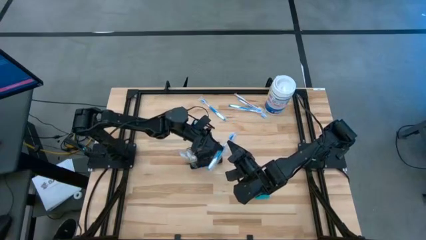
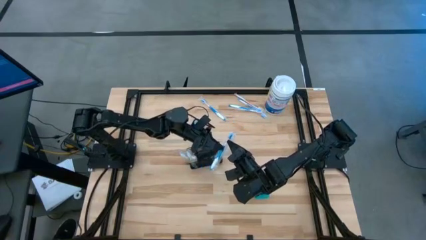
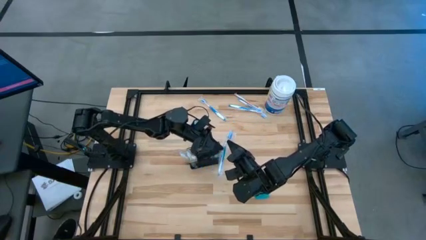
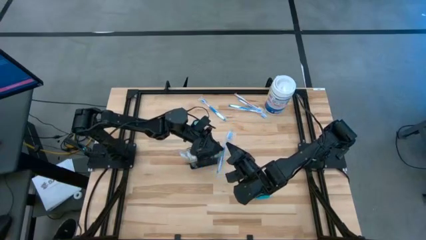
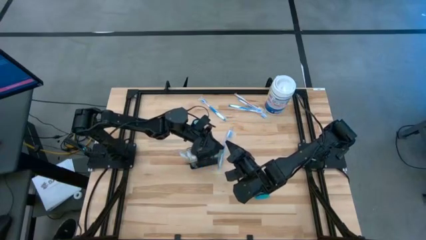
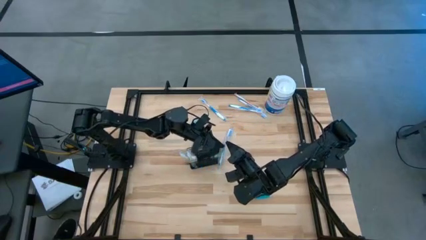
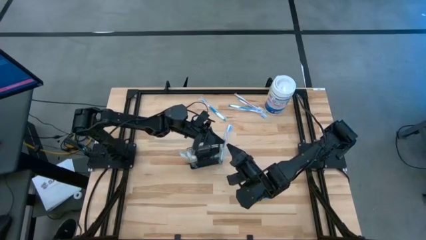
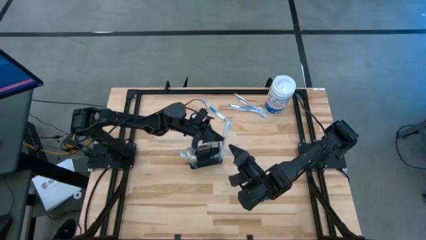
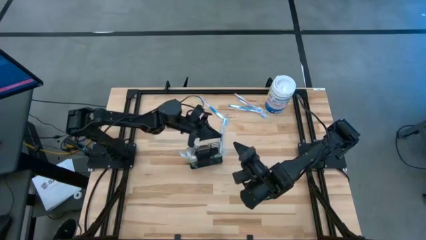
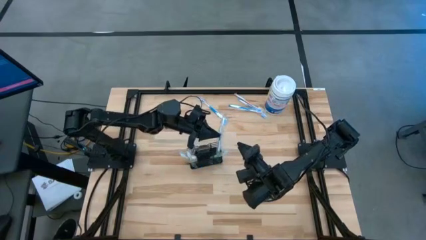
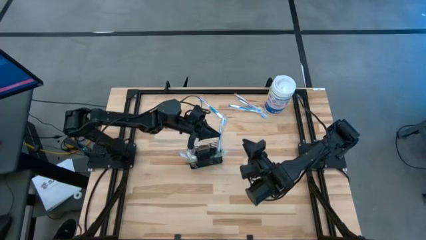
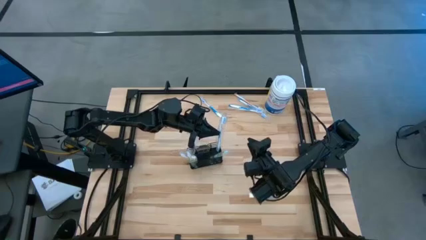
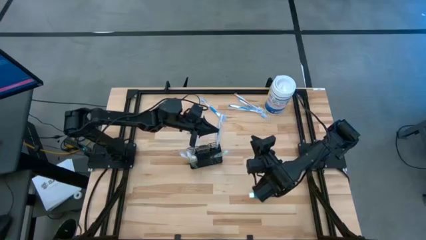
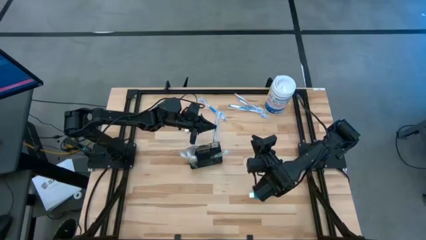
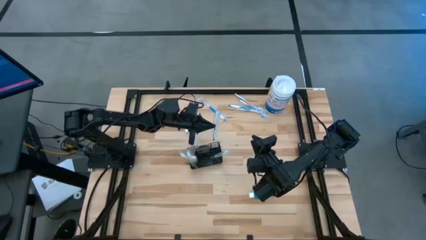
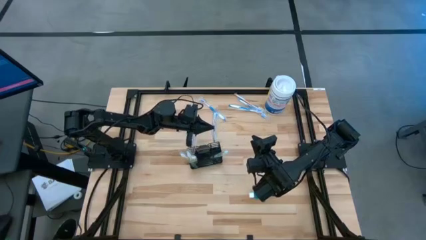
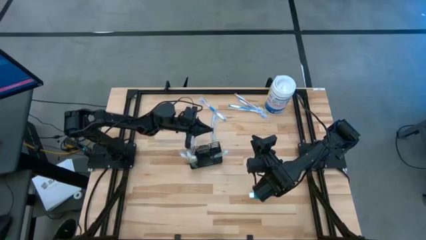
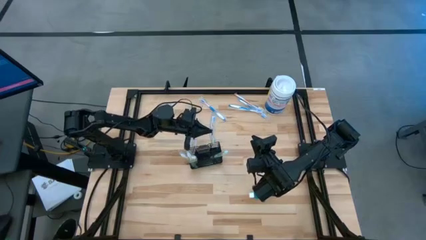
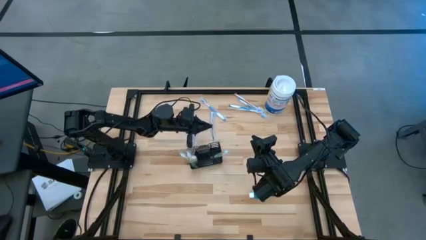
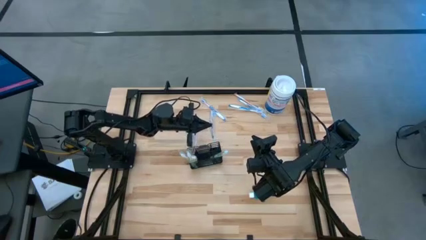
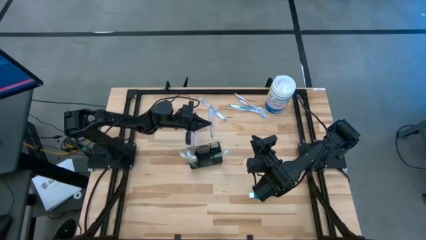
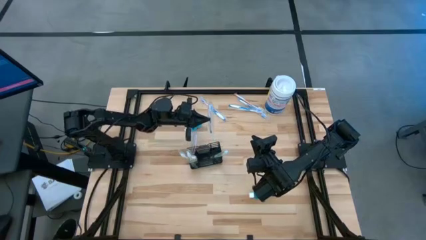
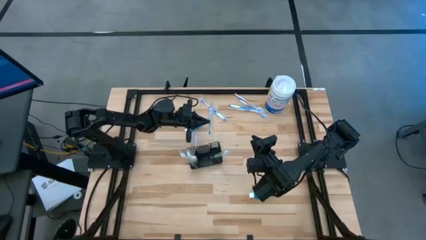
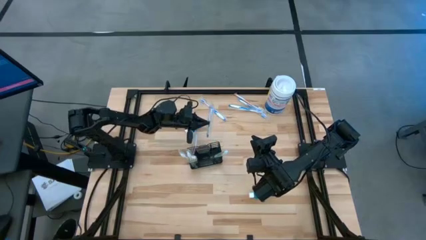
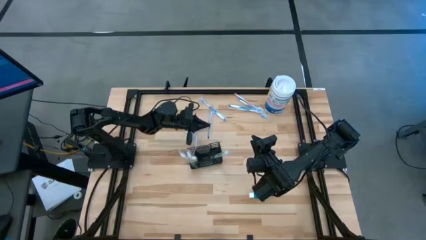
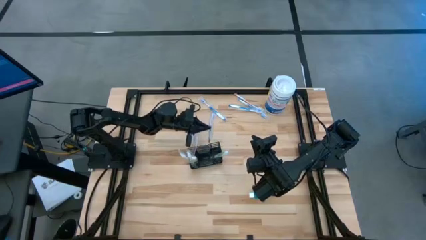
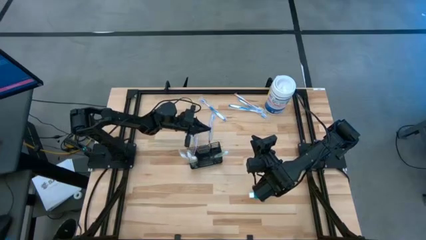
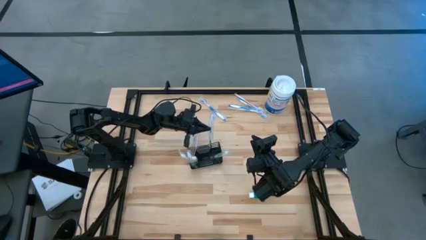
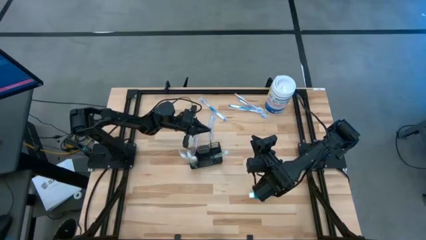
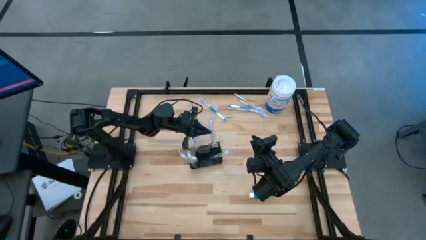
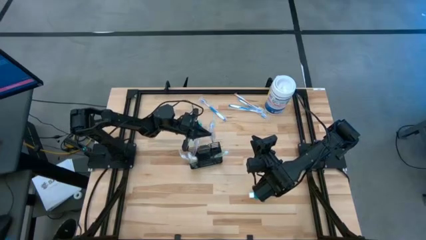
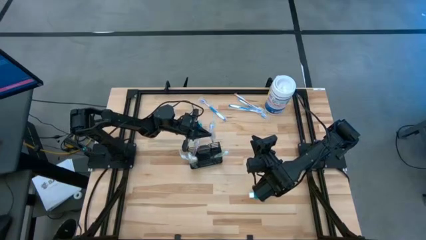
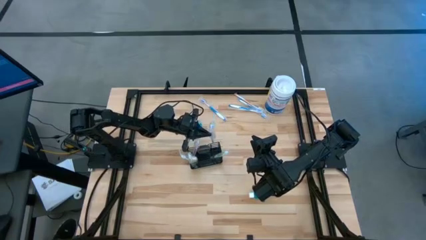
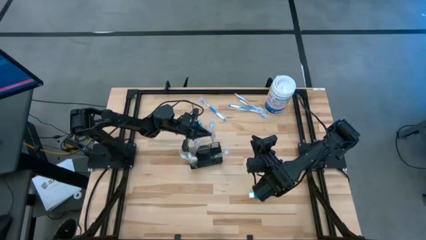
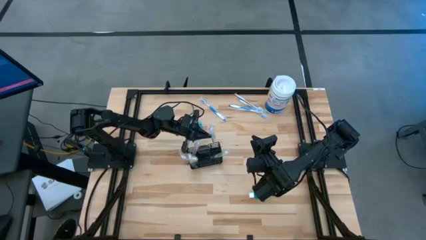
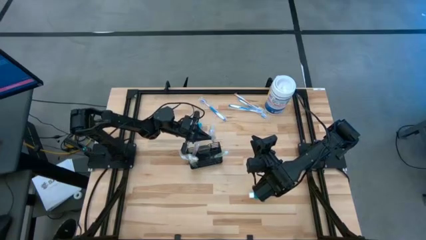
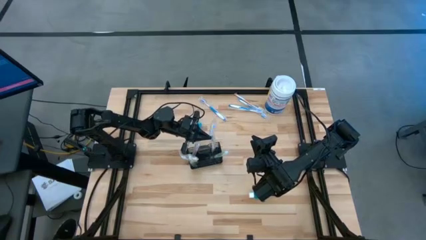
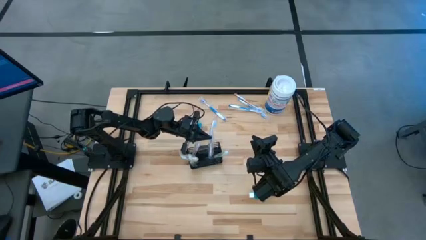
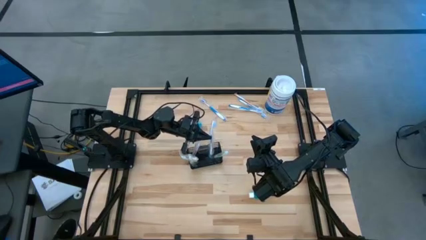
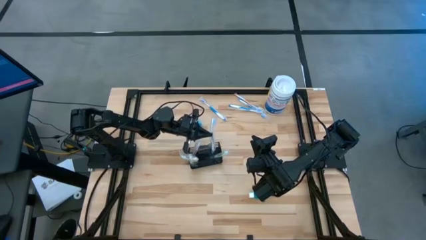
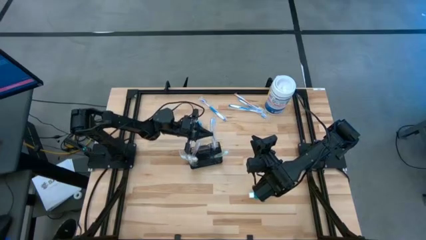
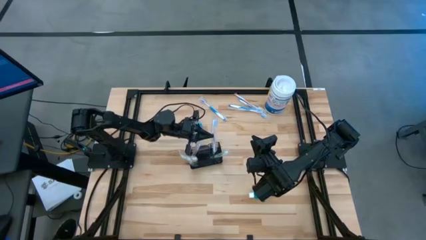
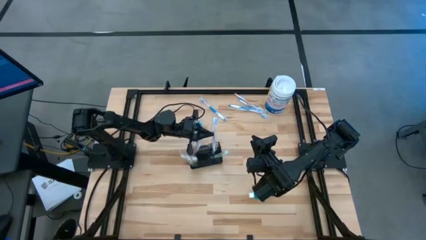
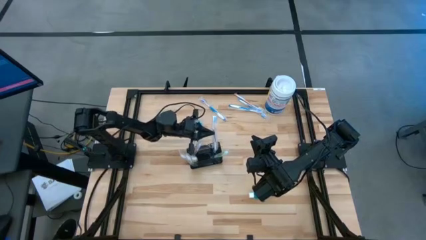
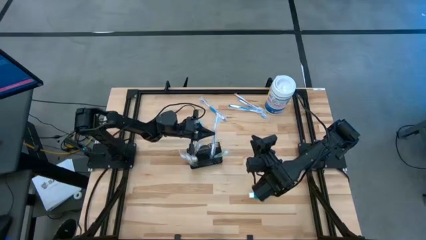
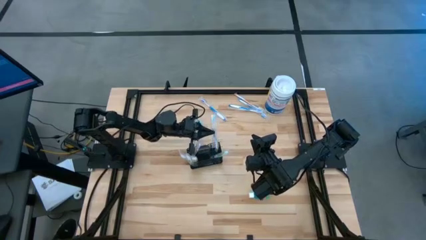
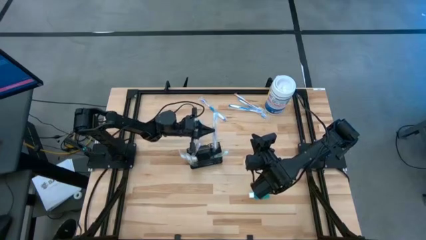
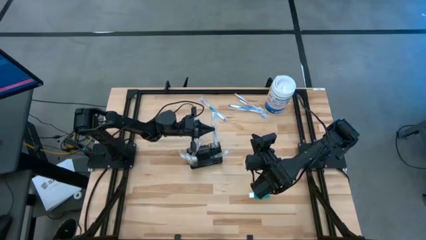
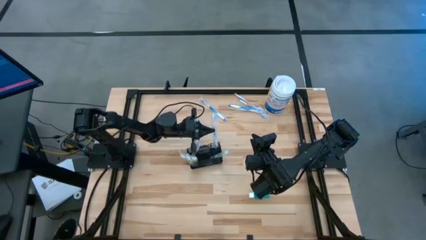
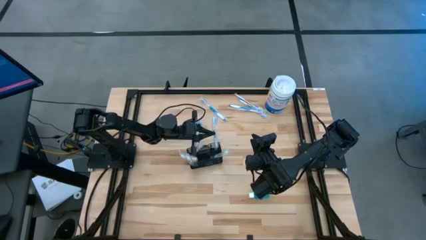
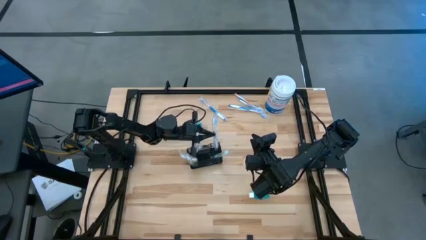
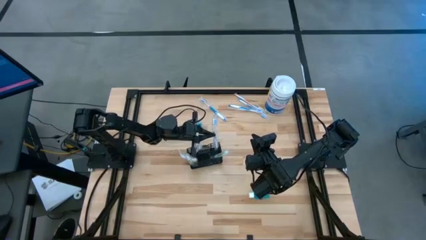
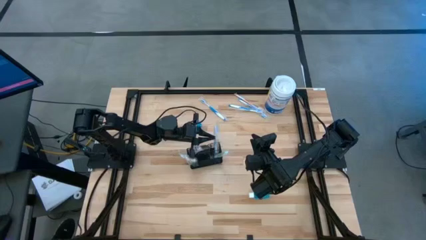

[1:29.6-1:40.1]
Task: Pick & Place toothbrushing station
Put the blue toothbrush into the wire organizer

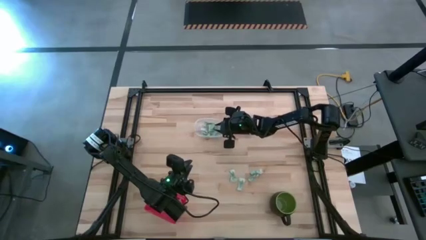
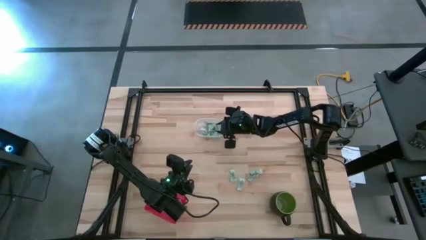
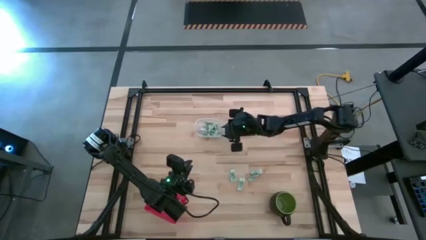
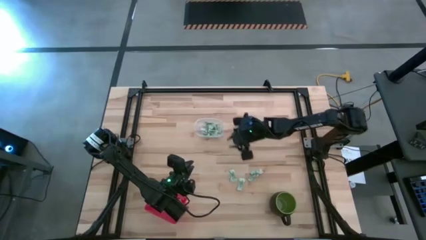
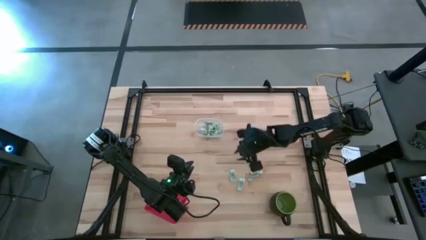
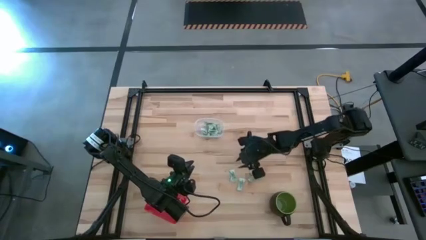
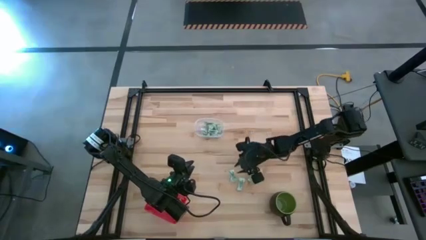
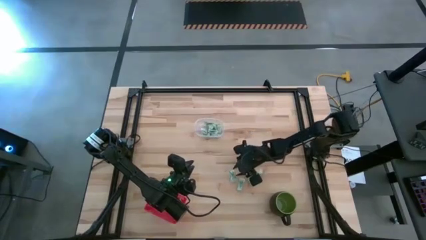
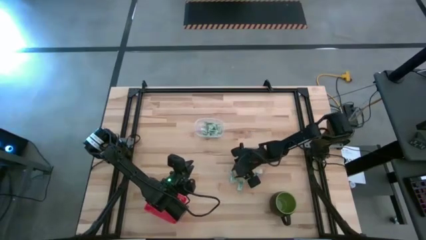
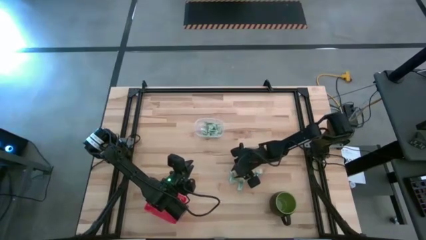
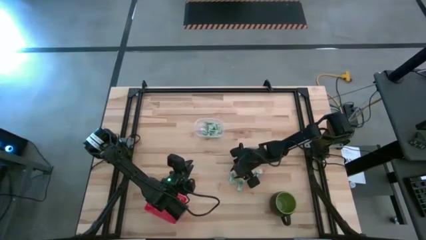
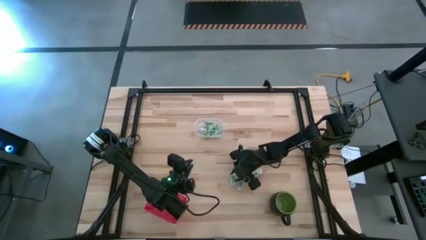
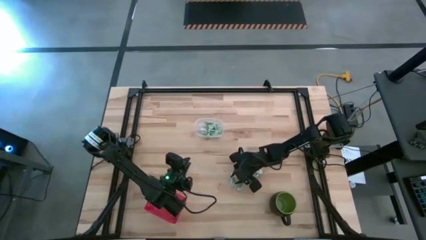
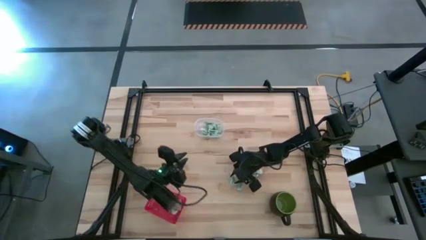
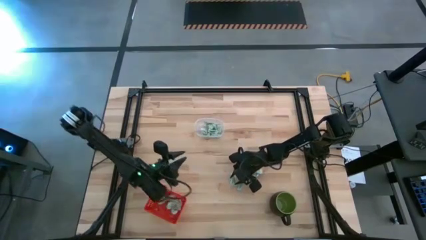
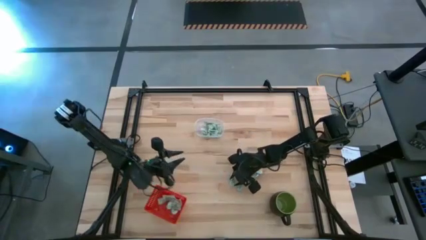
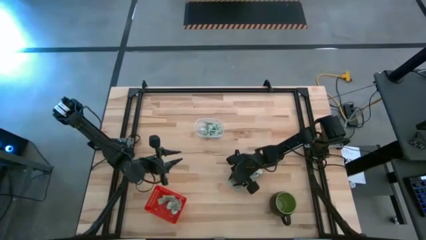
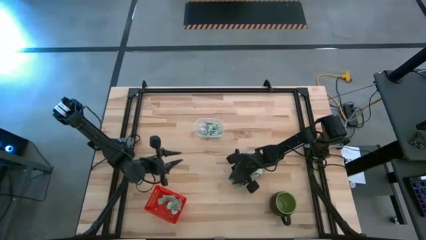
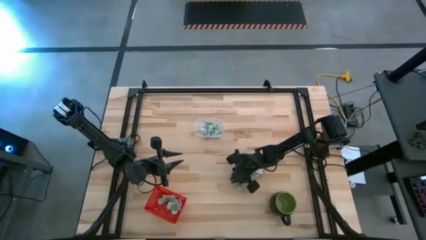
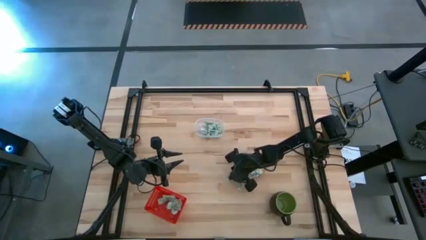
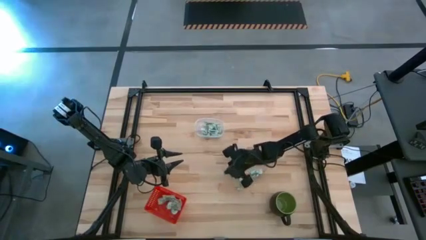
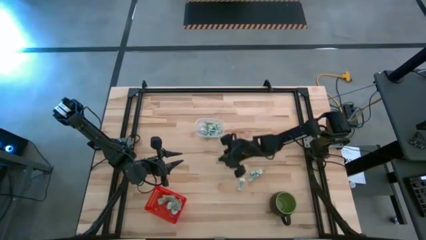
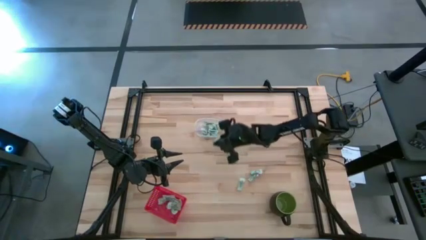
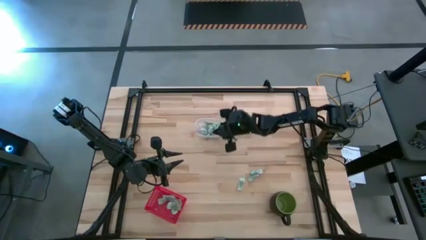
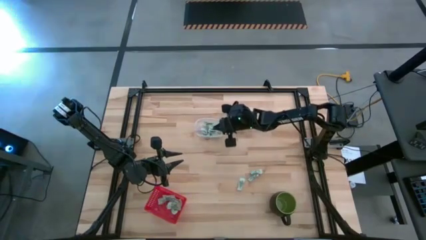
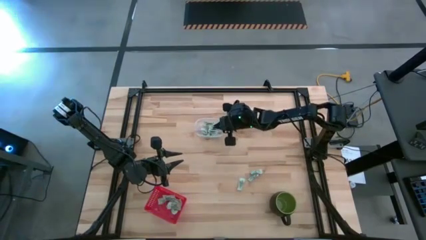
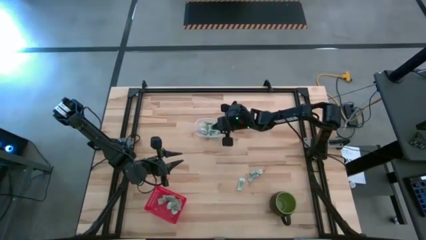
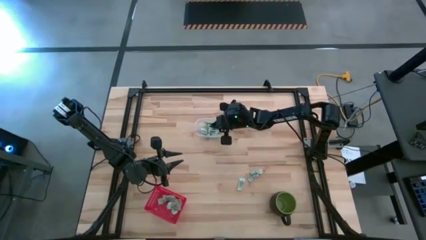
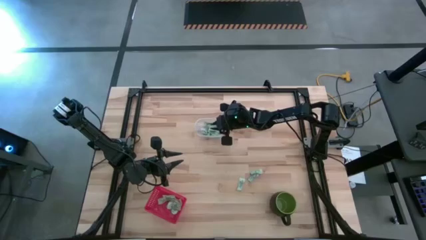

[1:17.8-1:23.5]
Task: Pick and place items into bin
Put the stevia packet into the transparent bin
